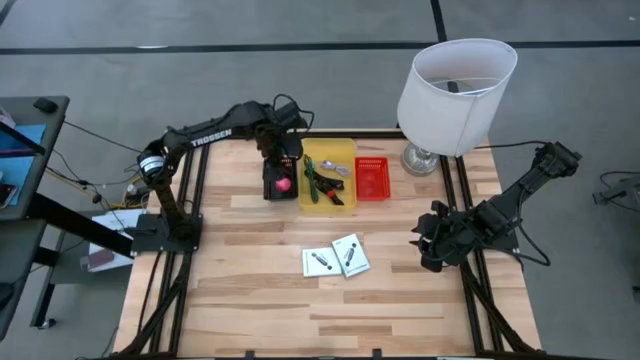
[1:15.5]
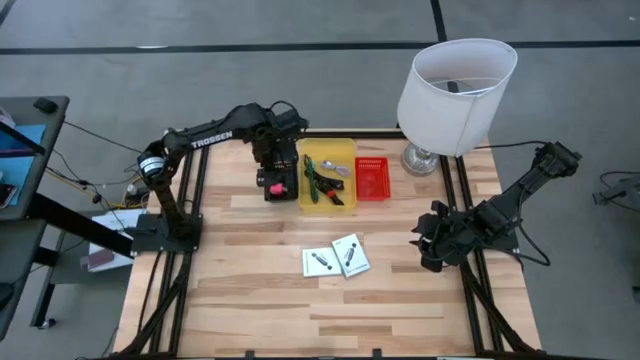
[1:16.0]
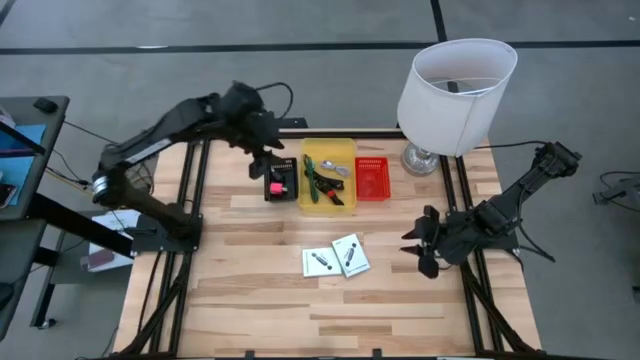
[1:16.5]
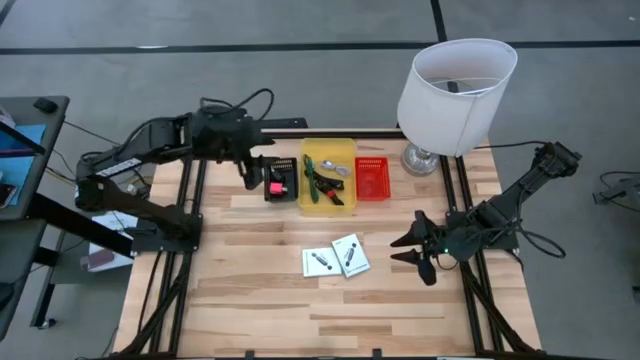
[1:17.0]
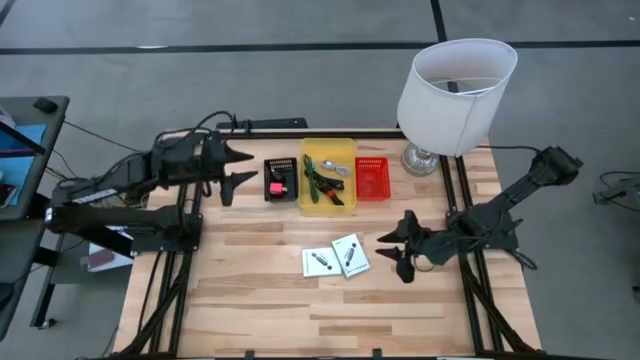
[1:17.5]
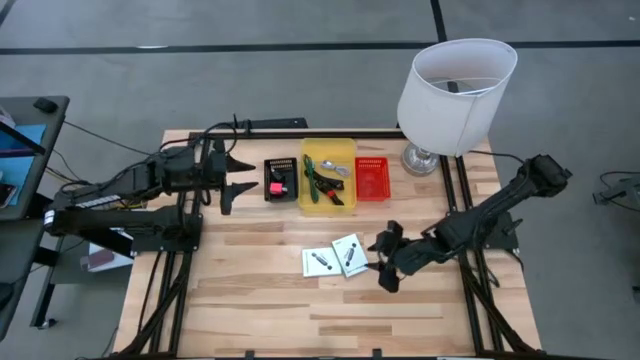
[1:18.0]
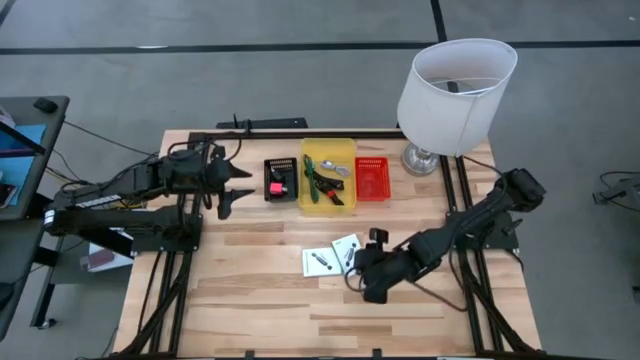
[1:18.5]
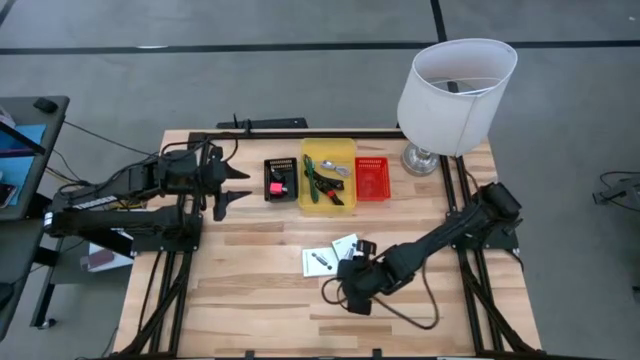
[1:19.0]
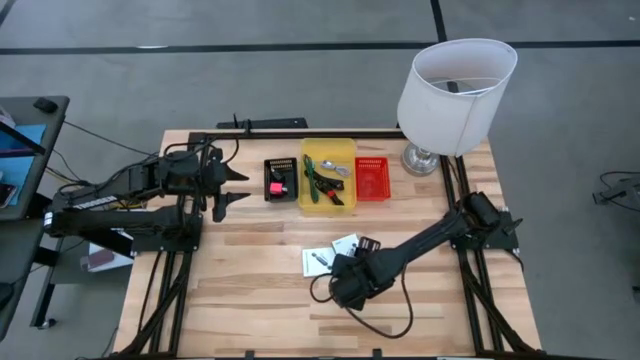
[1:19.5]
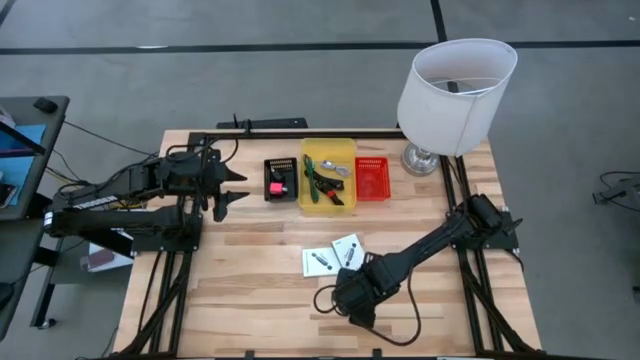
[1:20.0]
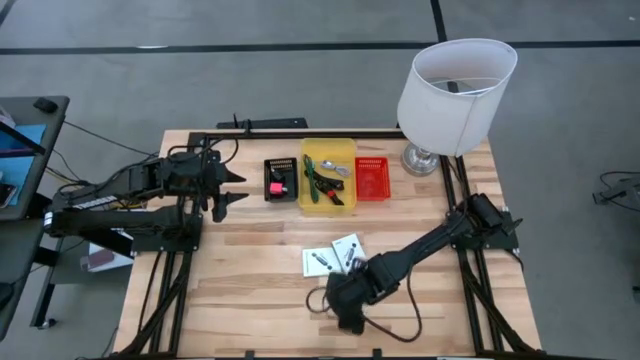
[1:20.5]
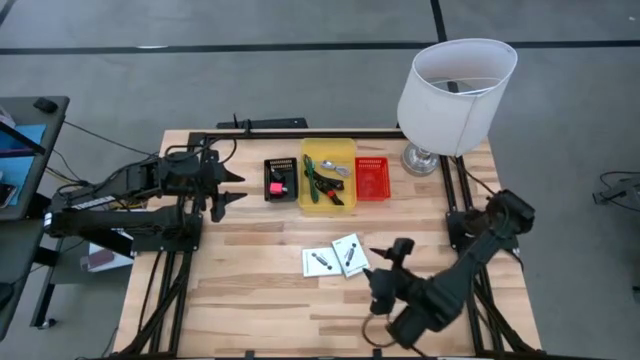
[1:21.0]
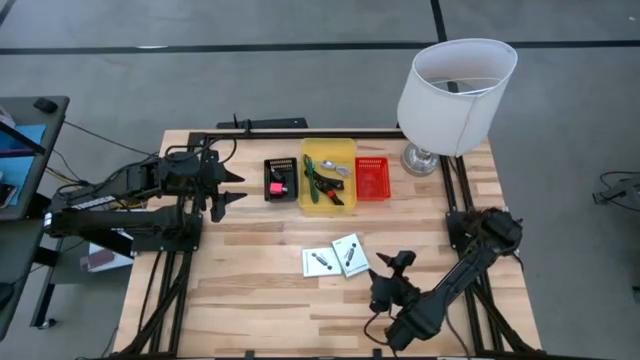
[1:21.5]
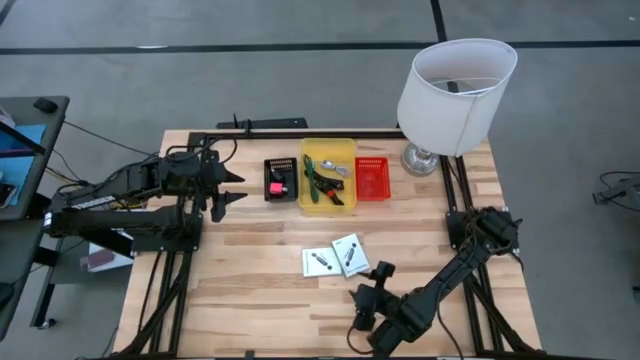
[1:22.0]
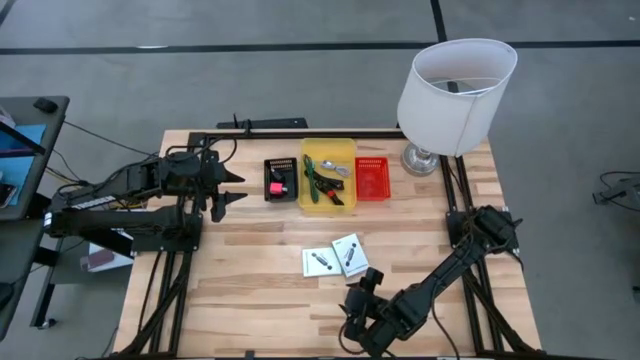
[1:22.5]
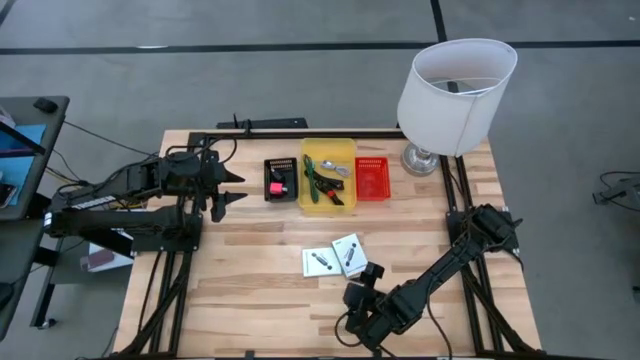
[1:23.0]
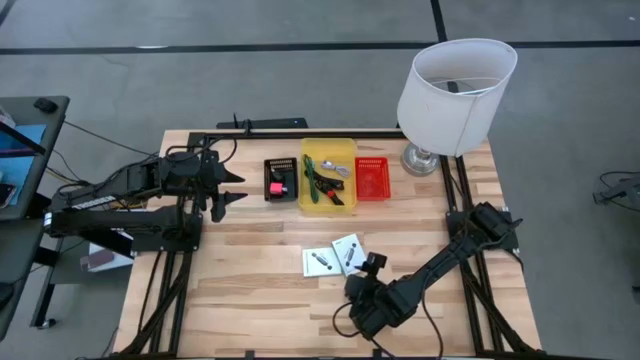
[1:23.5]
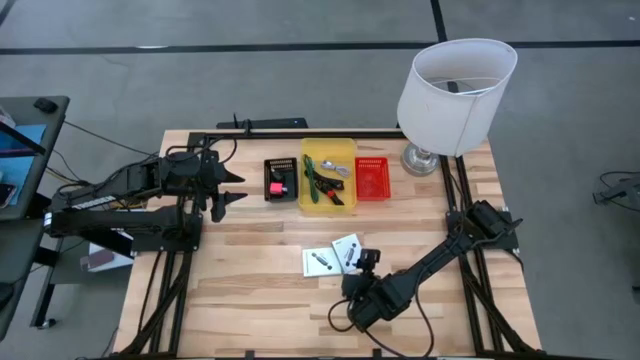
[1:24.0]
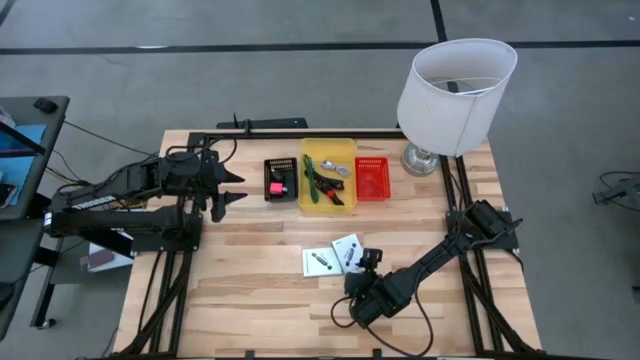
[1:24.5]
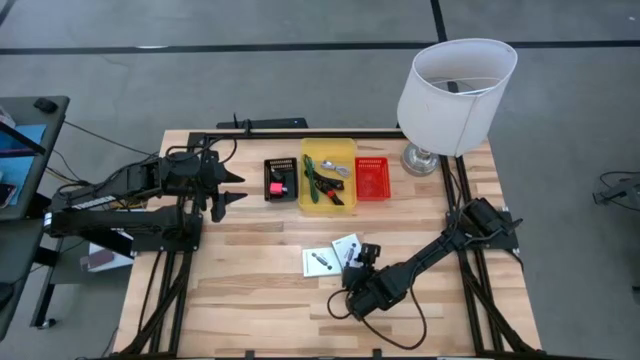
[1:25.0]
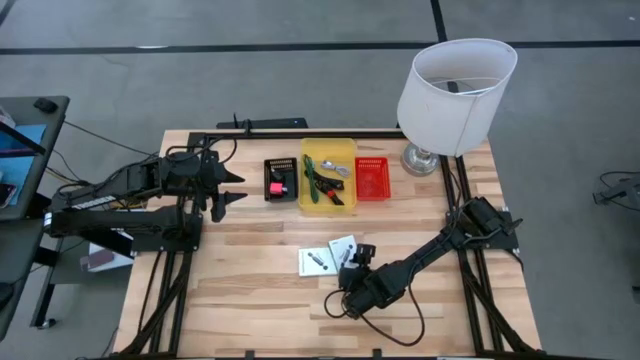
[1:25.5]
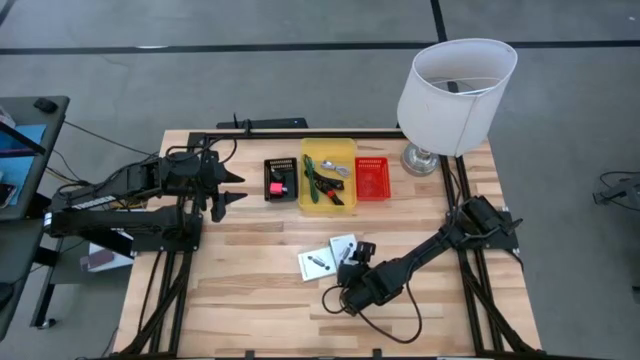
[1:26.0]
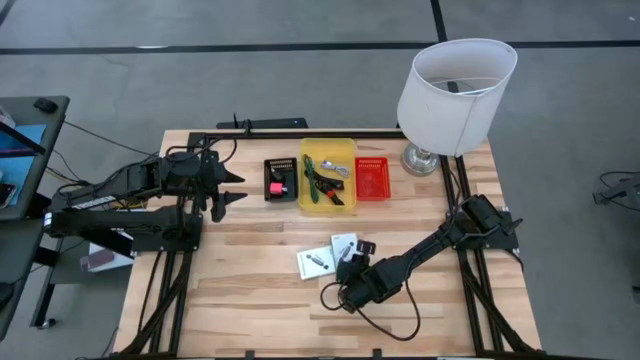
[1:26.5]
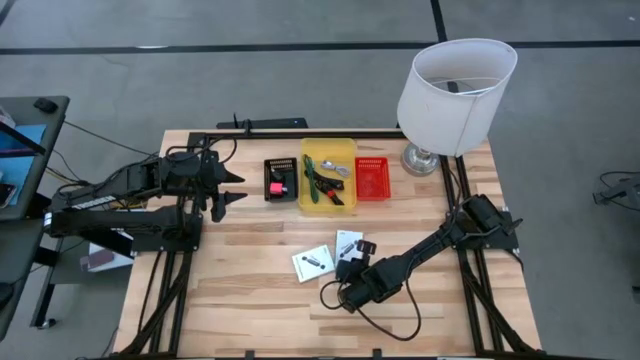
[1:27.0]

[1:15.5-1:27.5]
Task: Pick and place items into bin
Put the right white card reader box into the red bin

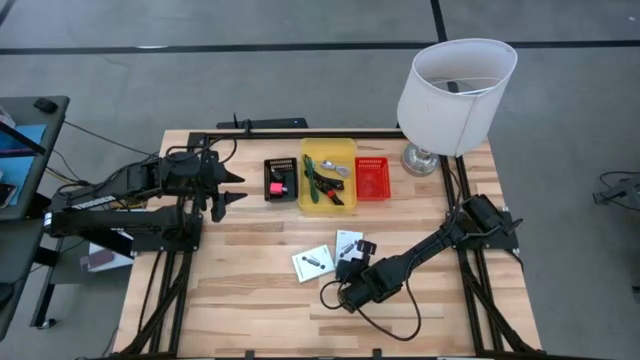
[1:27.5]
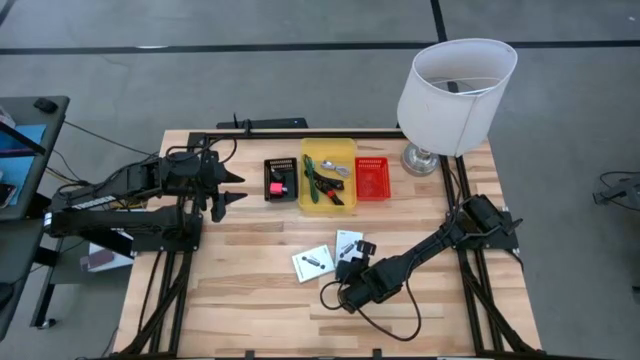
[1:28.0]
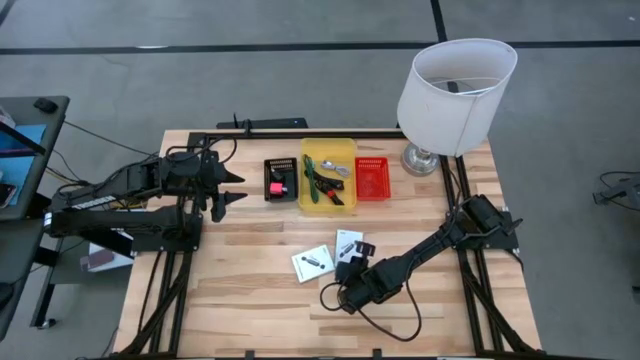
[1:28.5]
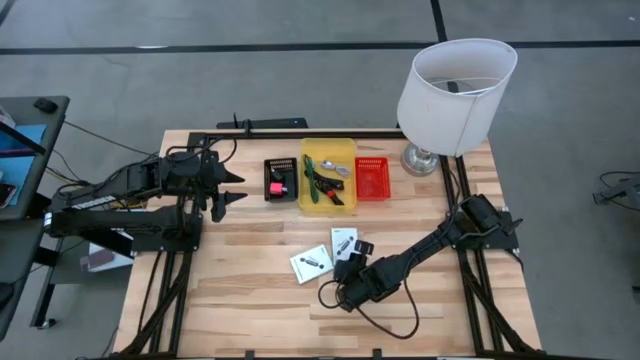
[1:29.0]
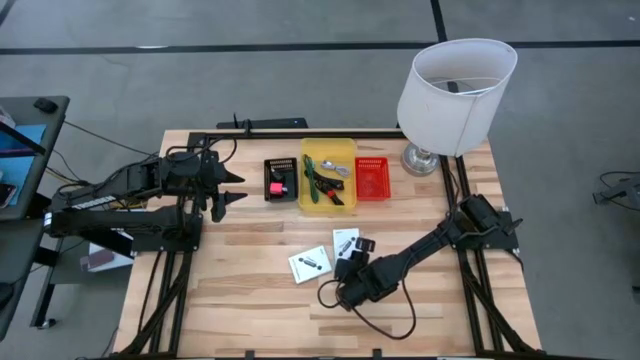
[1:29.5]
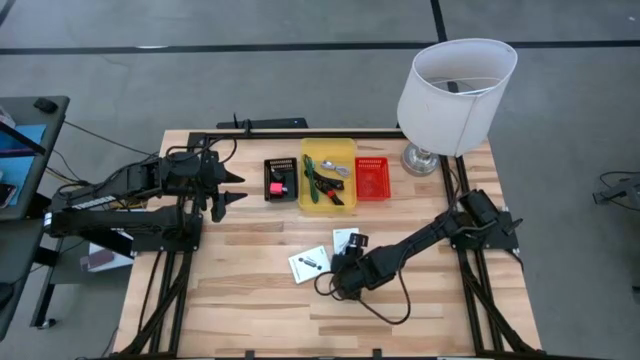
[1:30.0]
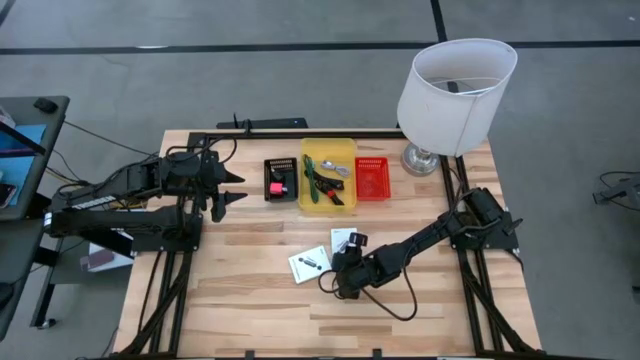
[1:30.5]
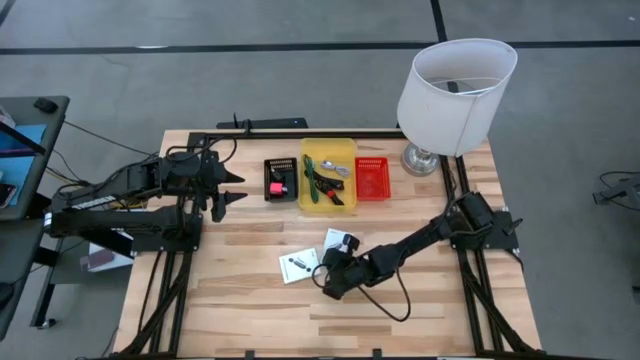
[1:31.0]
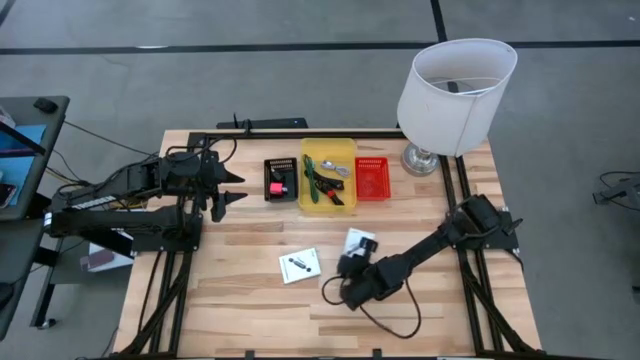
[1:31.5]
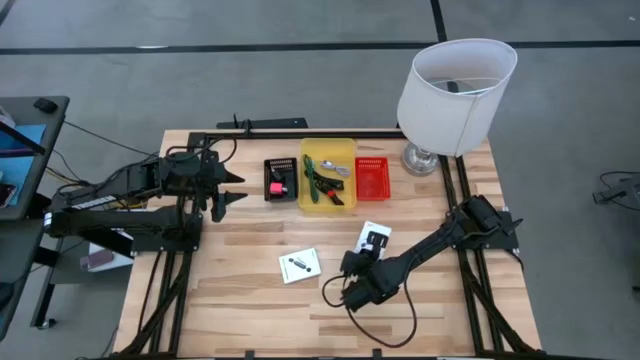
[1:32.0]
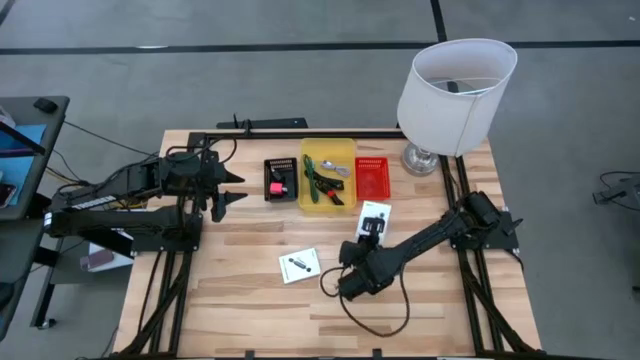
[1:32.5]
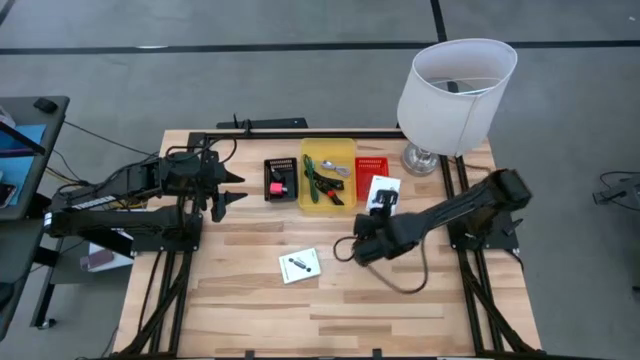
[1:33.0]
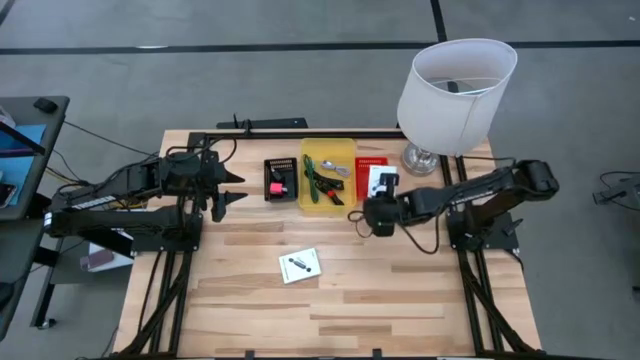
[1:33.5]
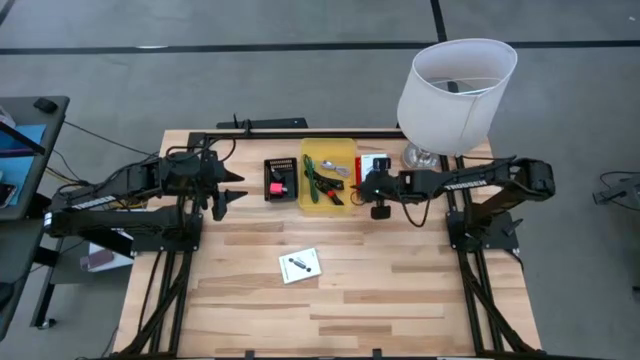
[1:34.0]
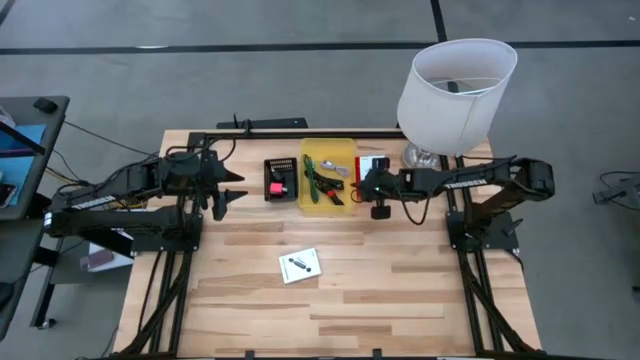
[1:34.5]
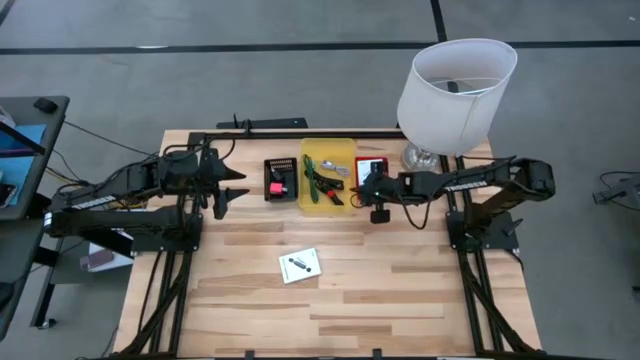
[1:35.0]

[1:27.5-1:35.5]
Put the right white card reader box into the red bin

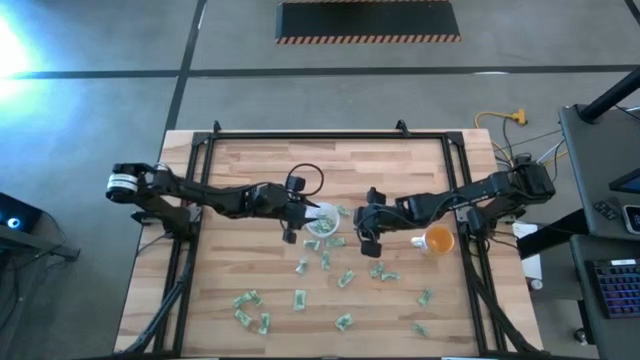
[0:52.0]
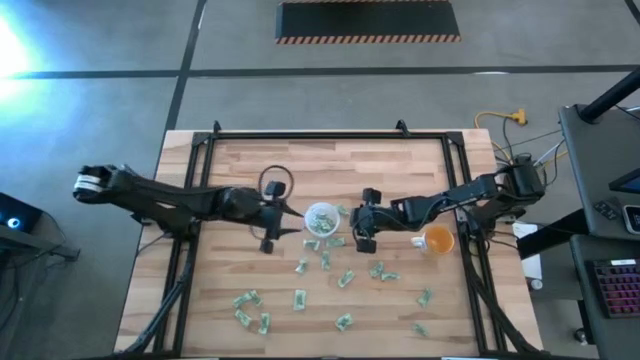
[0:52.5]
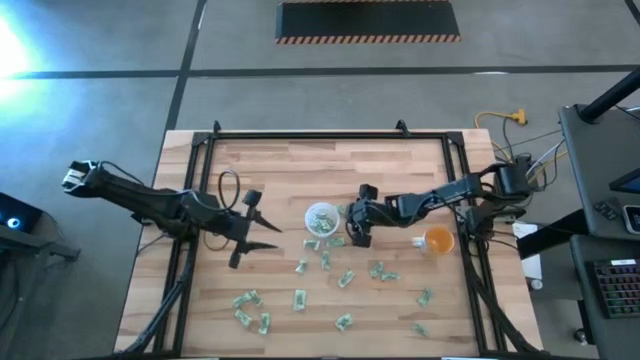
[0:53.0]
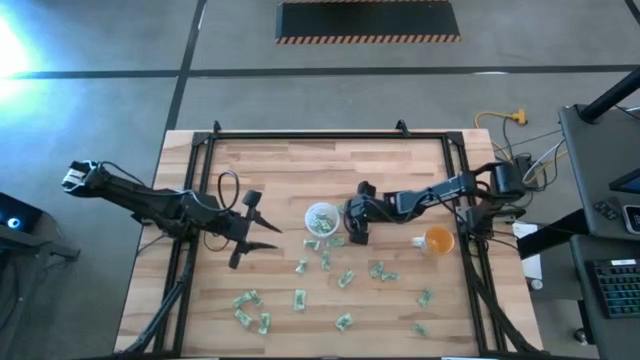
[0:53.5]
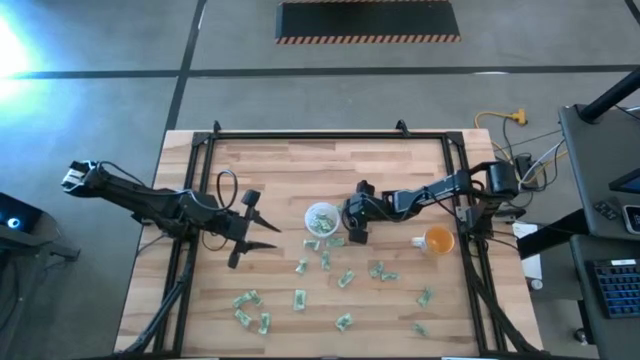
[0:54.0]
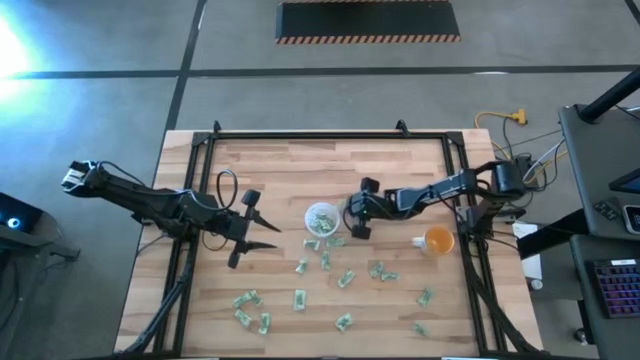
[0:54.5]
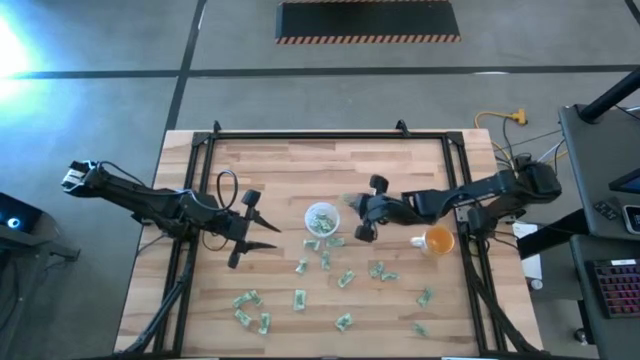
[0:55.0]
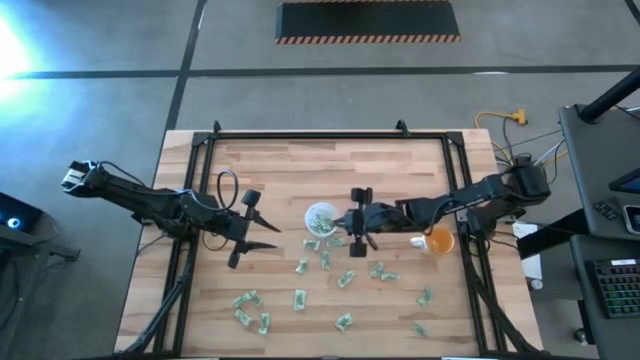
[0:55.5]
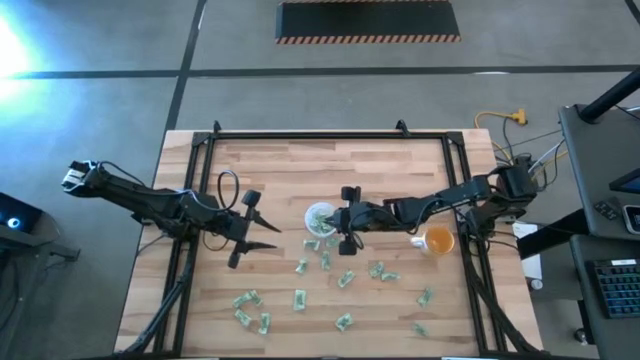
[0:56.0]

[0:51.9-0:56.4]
Task: Pick and place Stevia / Truvia into bins
Put the light green stevia packet into the transparent container
